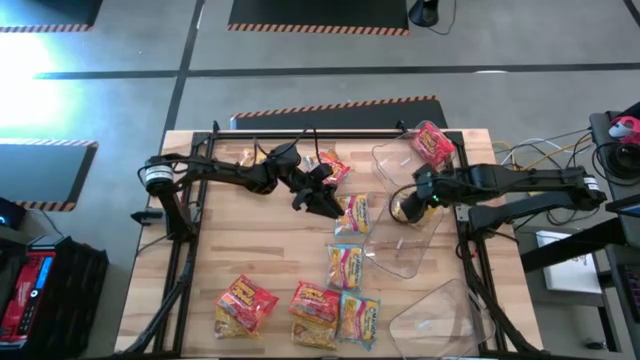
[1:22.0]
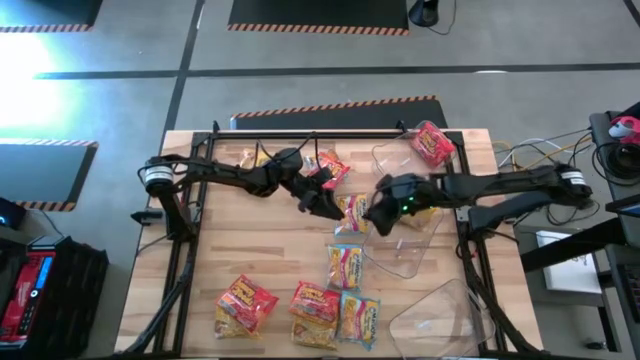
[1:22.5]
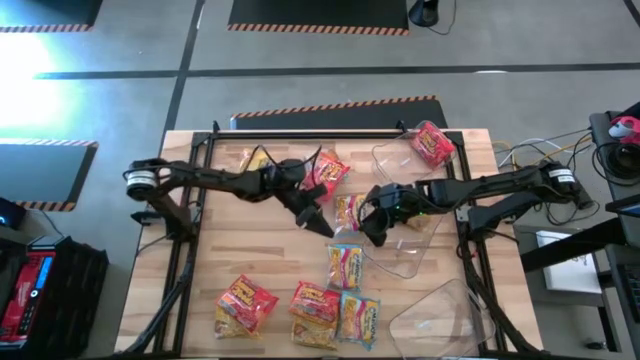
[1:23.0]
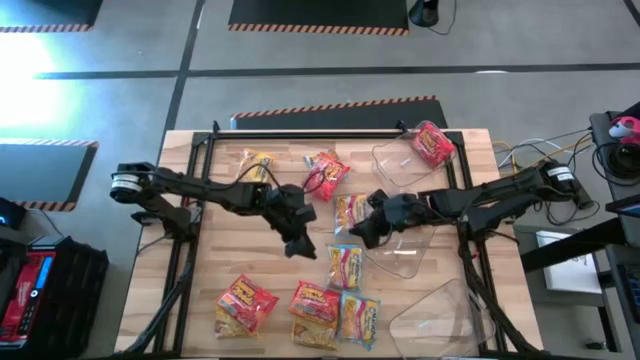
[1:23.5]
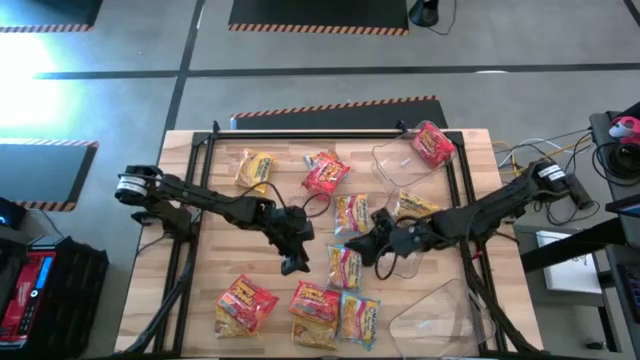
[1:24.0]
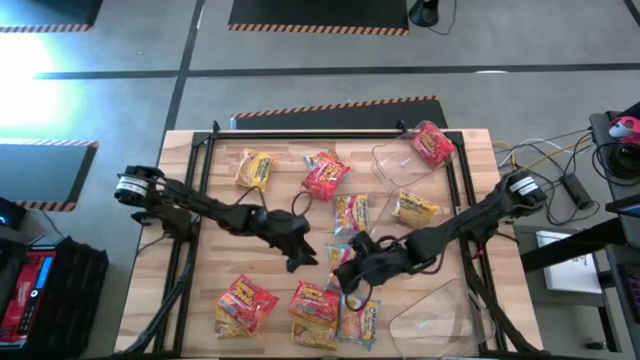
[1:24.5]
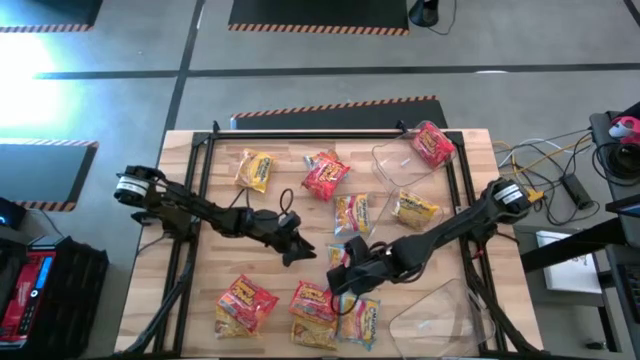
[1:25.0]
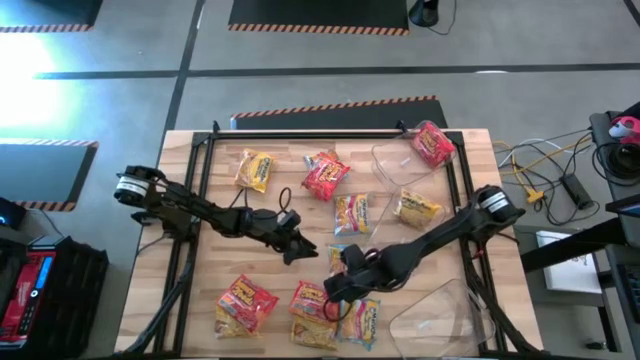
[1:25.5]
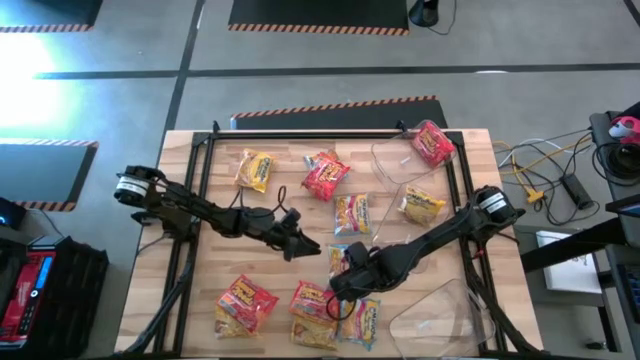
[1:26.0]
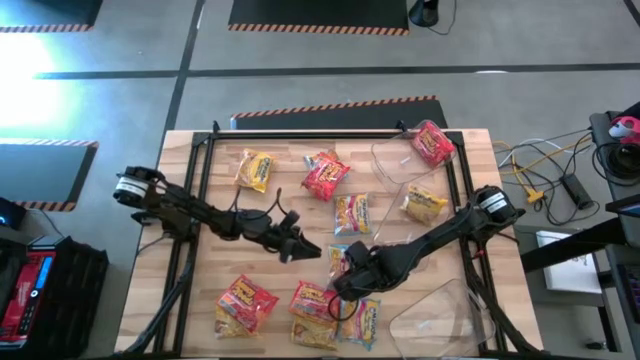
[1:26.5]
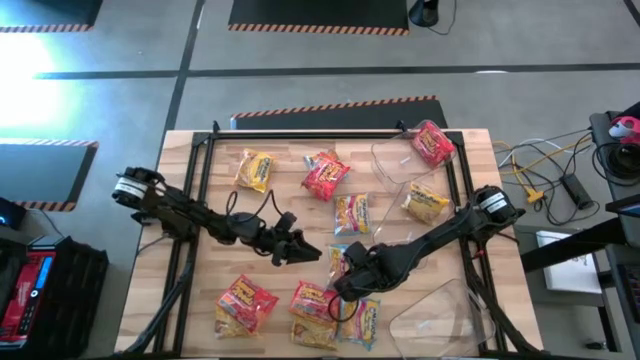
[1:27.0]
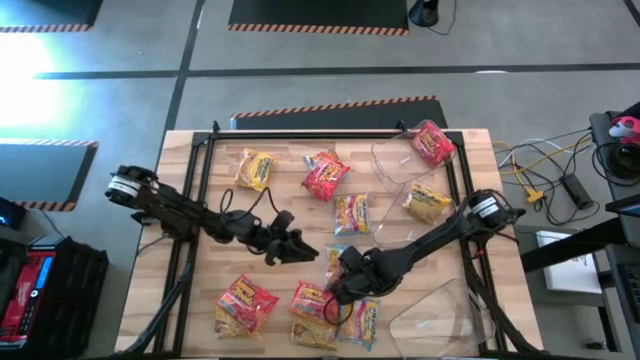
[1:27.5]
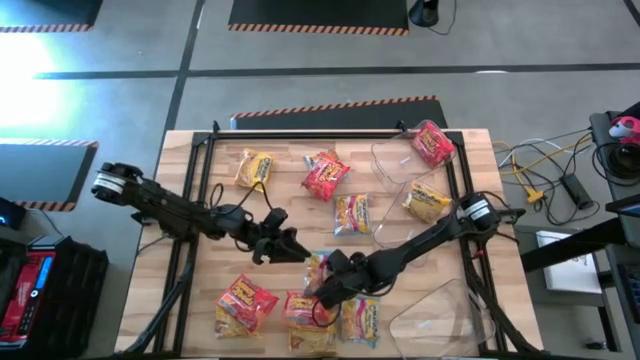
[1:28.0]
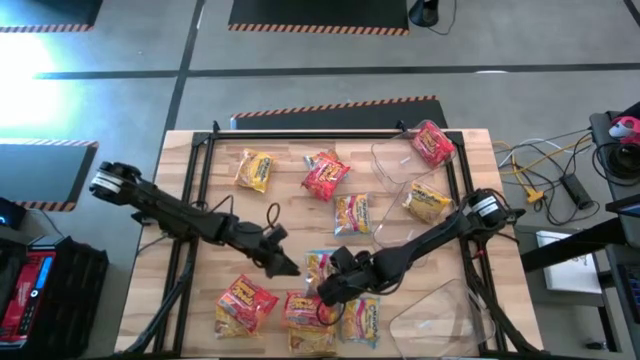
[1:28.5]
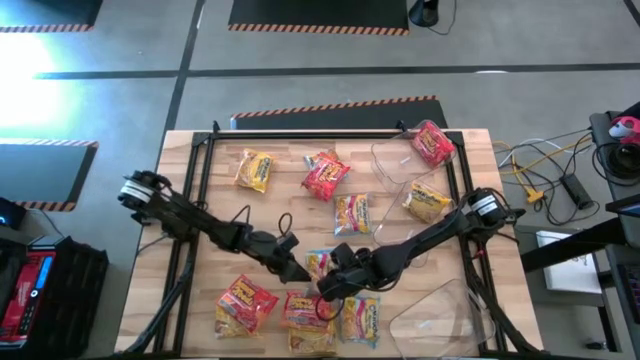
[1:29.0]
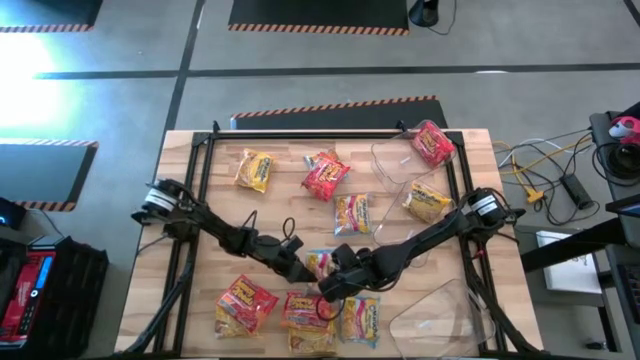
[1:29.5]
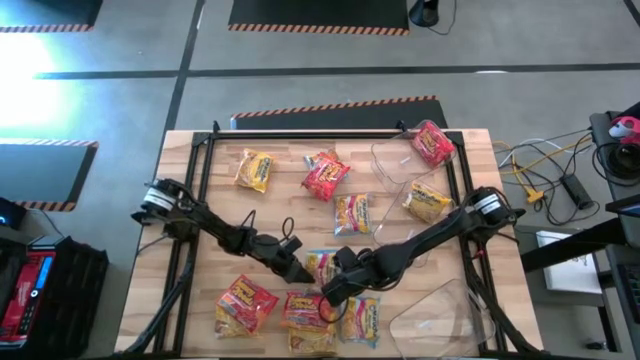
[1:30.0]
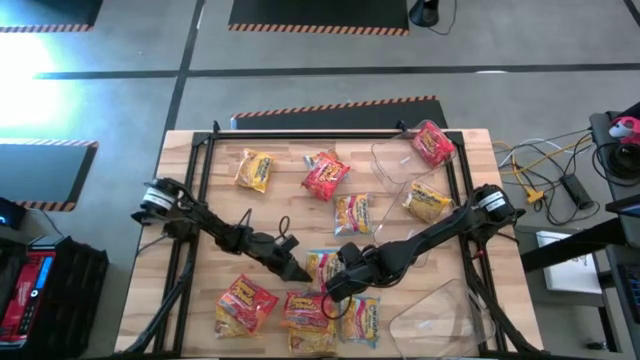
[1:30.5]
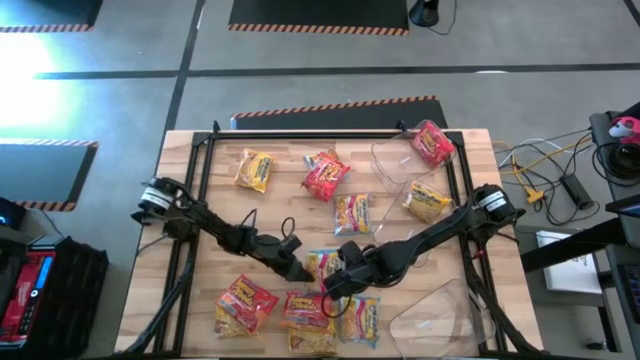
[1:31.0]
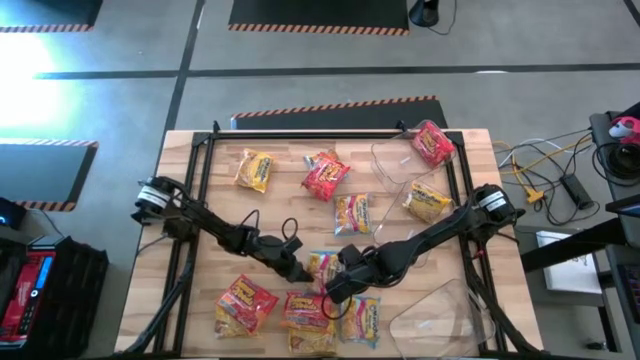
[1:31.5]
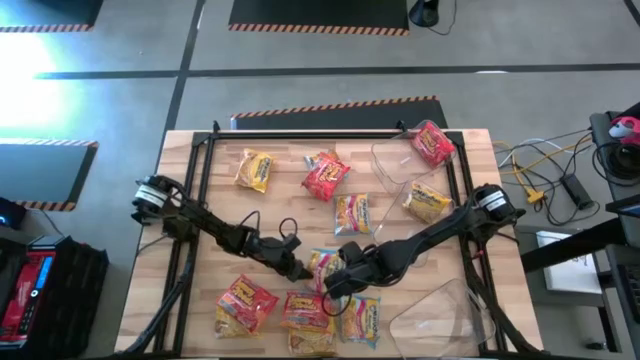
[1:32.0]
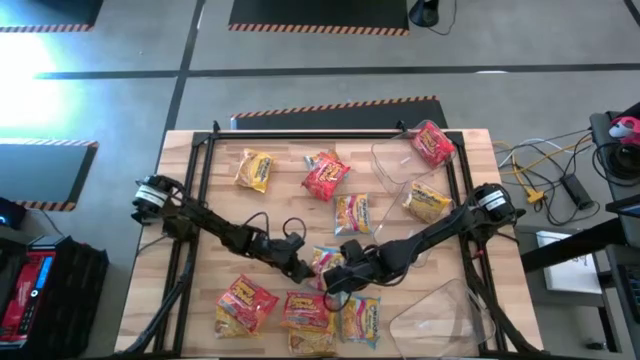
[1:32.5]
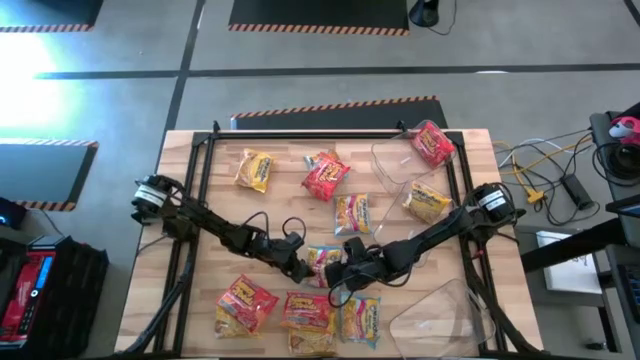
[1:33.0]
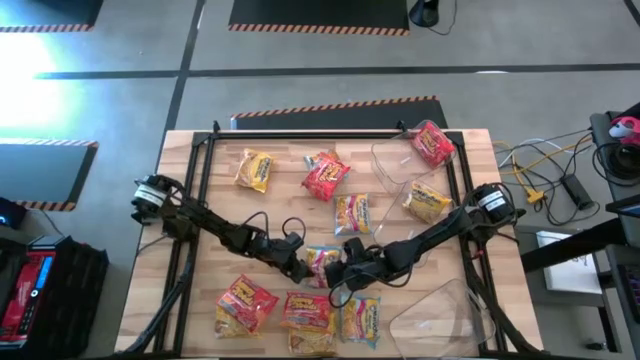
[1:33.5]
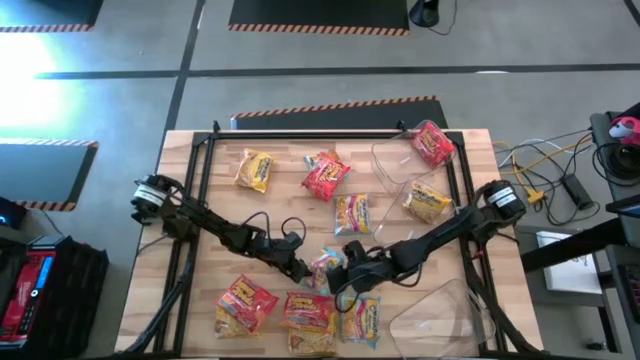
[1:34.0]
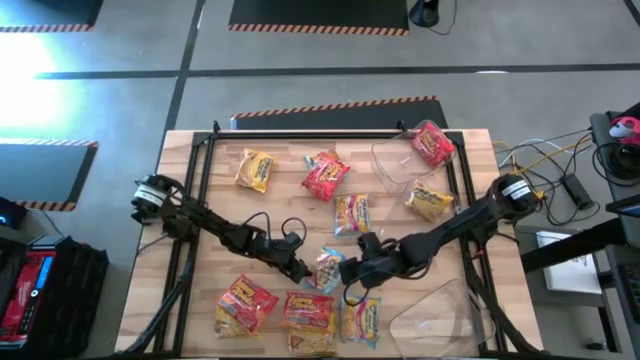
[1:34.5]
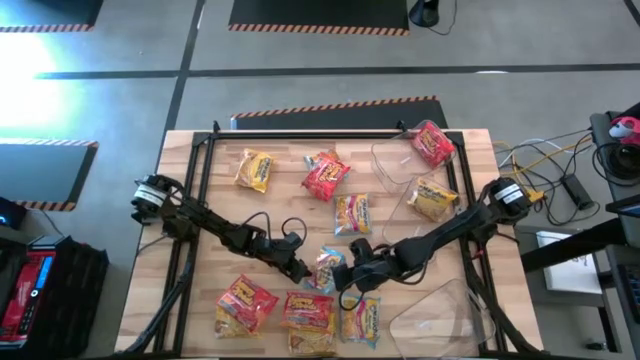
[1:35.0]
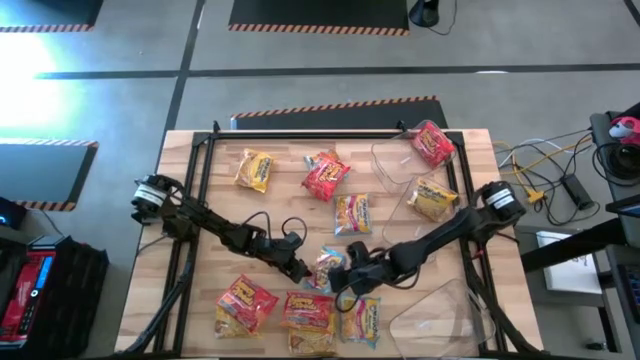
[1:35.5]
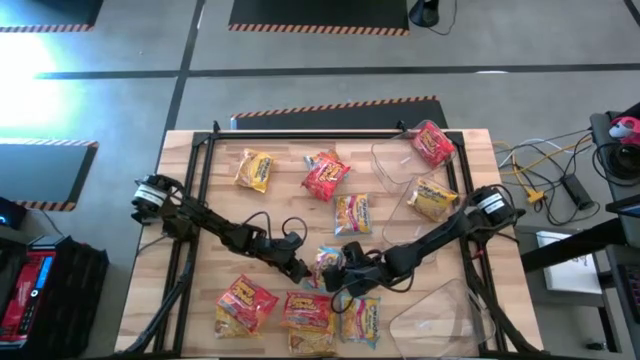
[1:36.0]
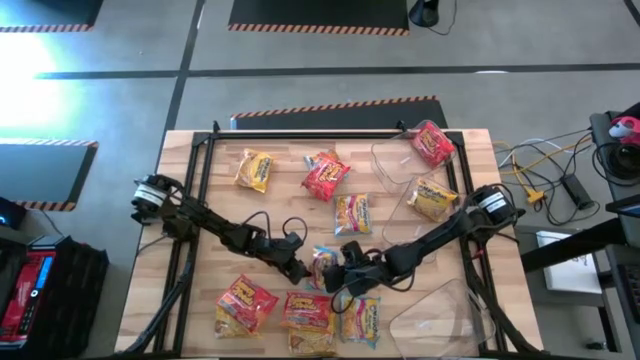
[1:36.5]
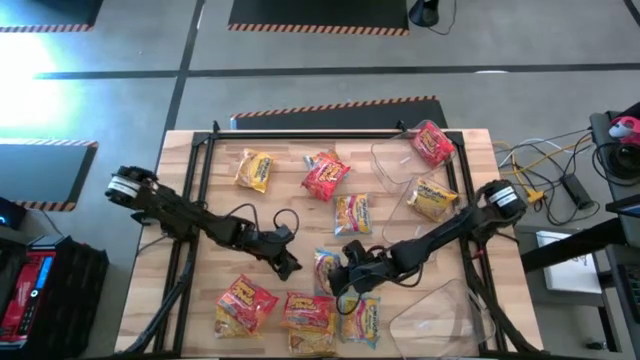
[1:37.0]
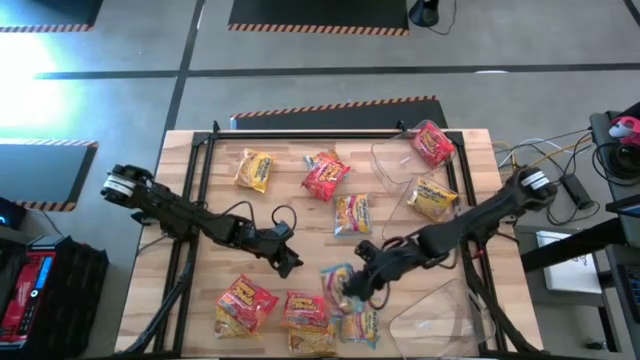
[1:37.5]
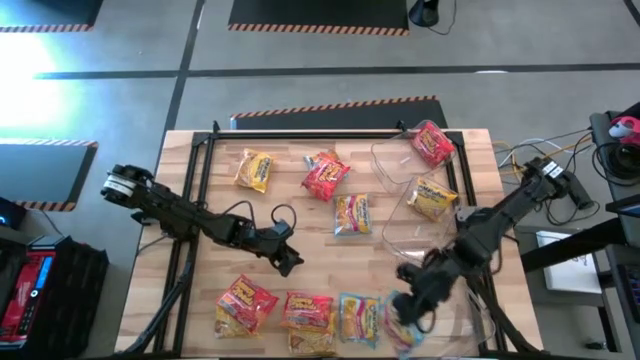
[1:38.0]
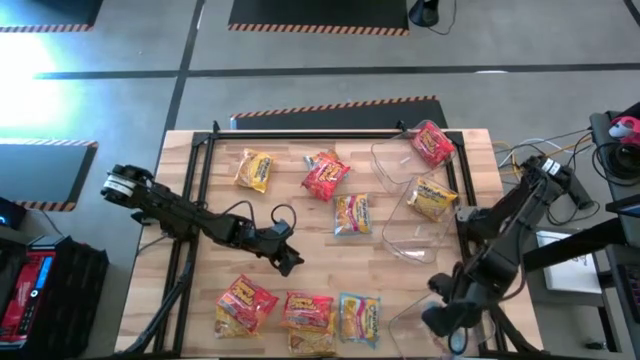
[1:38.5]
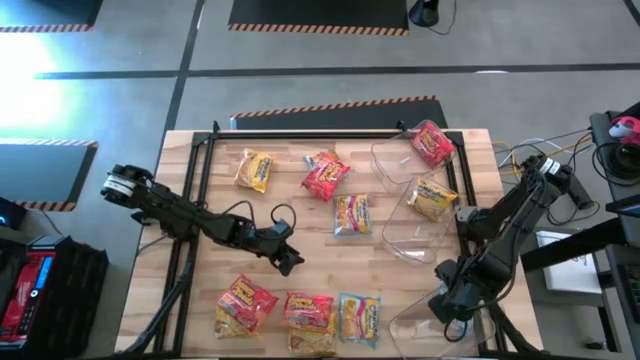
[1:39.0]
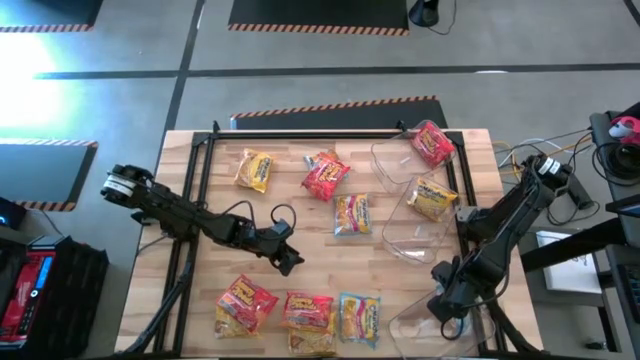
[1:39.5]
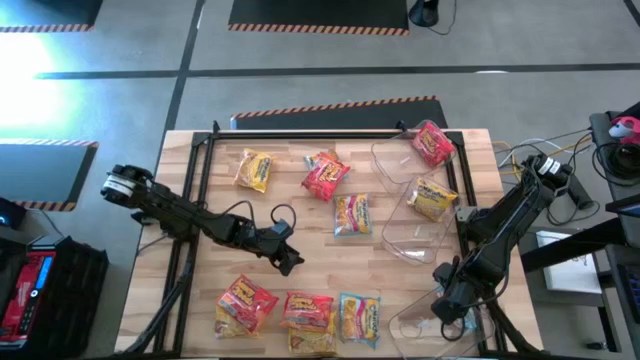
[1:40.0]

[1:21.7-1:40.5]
Task: Sort Maruchan noodles
Put the blue noodle pack into the bottom transparent bin

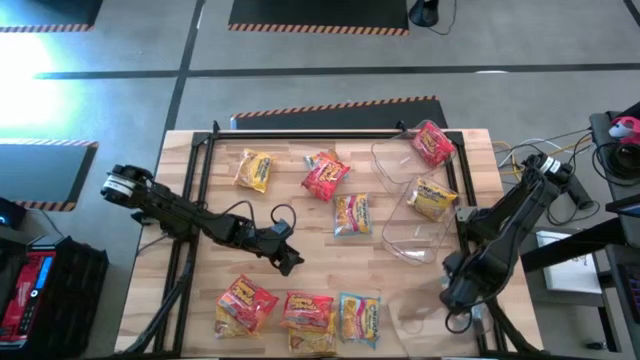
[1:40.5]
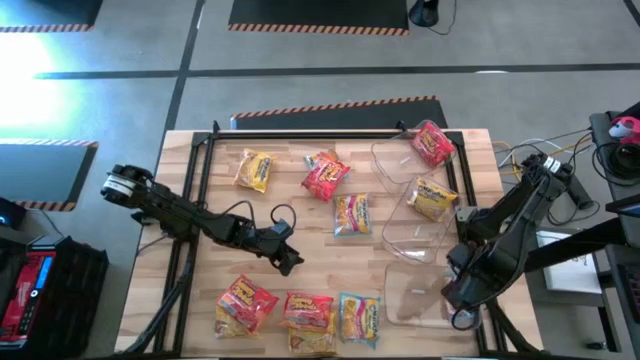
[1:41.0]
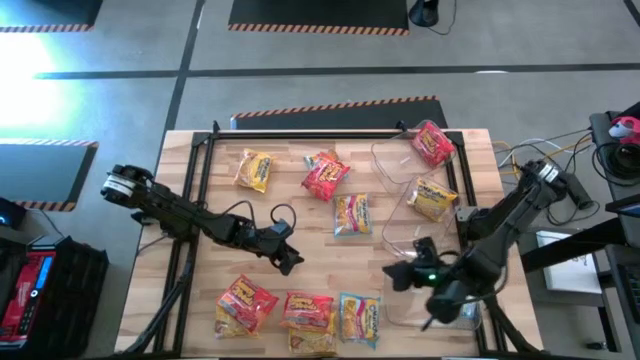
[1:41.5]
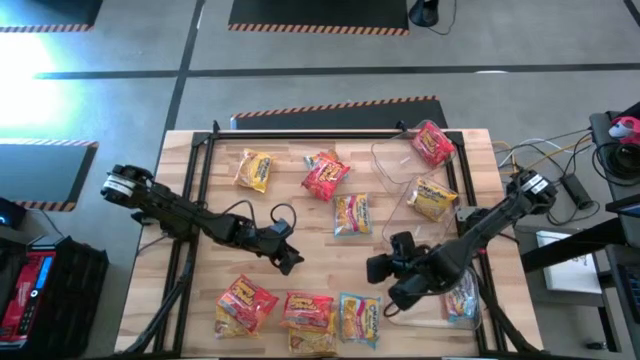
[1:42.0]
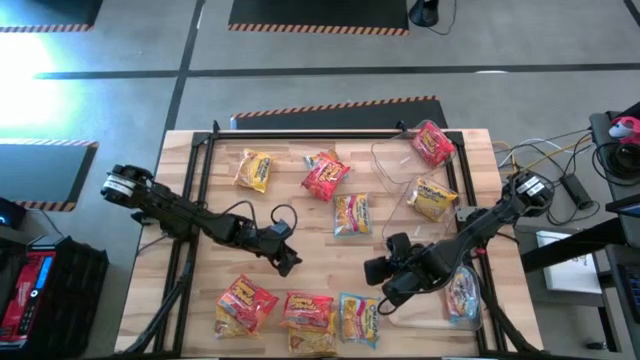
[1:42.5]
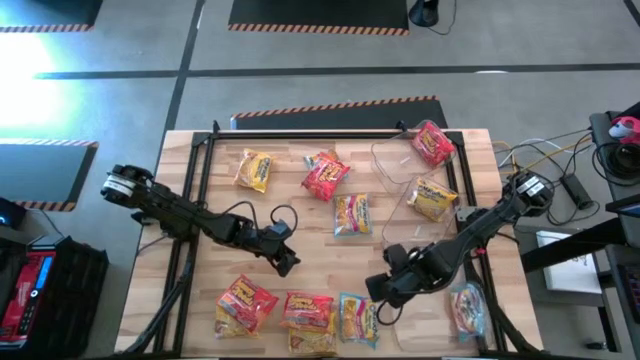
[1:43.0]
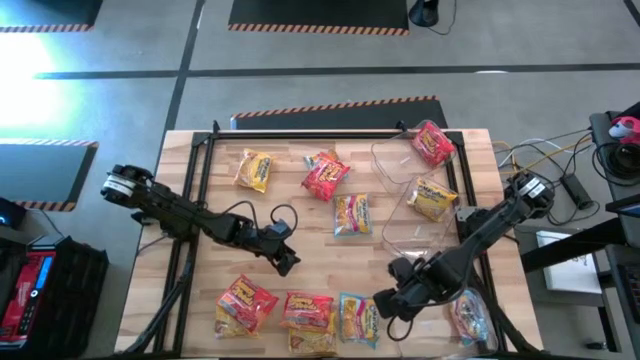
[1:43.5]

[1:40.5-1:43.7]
Adjust the bottom transparent bin
